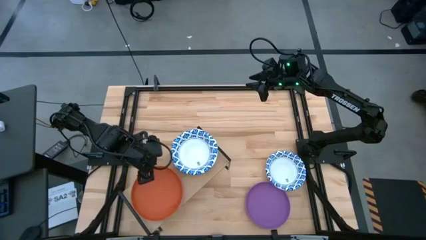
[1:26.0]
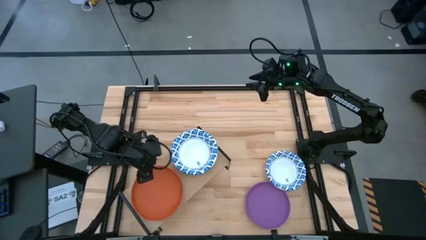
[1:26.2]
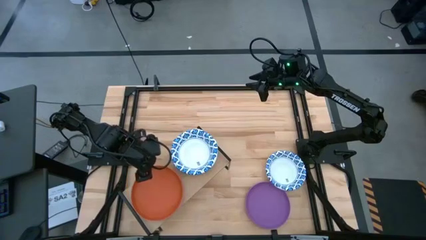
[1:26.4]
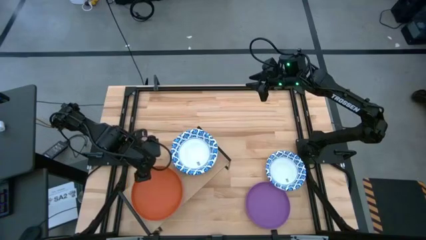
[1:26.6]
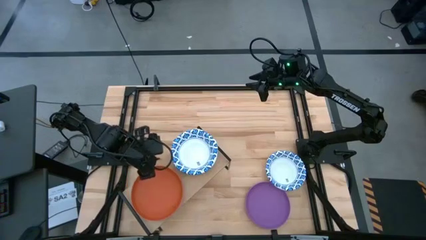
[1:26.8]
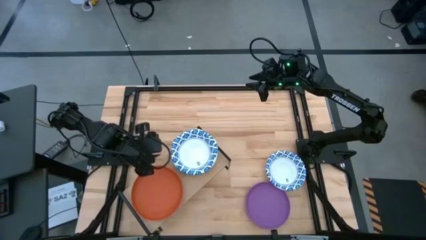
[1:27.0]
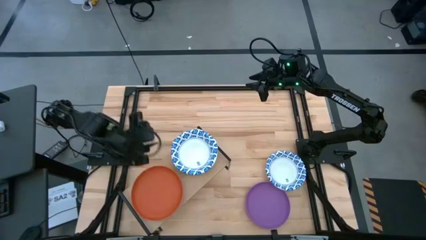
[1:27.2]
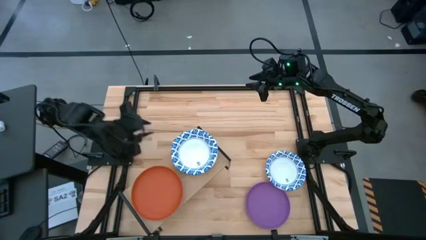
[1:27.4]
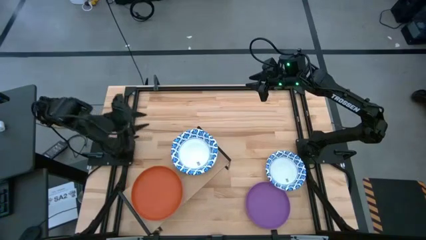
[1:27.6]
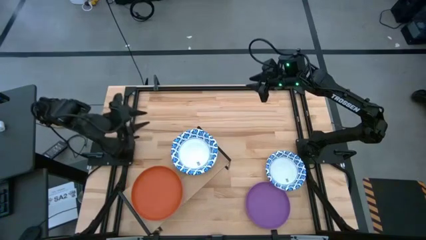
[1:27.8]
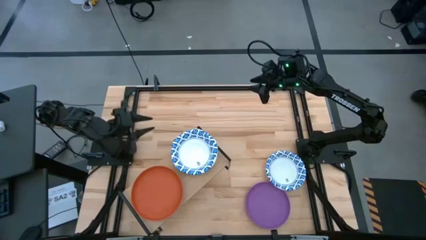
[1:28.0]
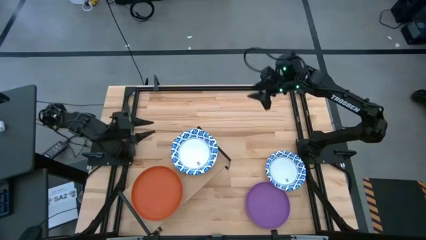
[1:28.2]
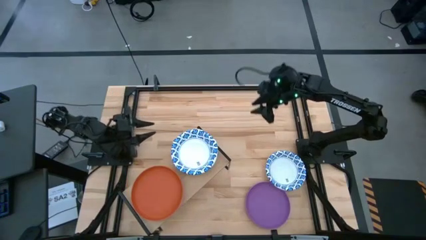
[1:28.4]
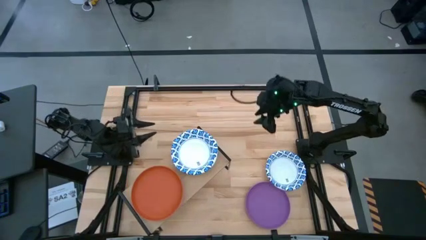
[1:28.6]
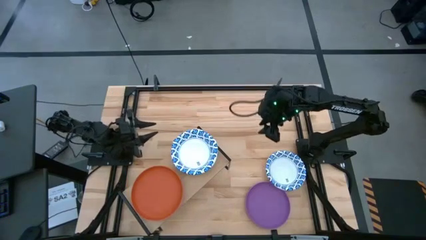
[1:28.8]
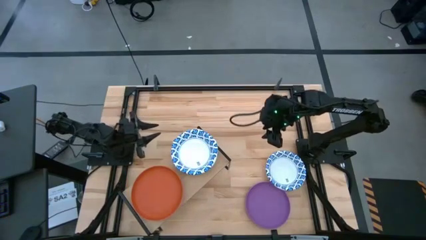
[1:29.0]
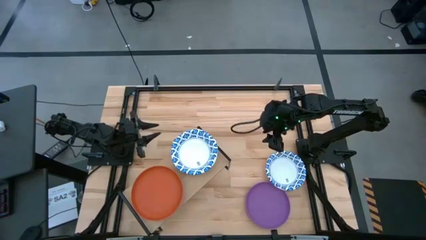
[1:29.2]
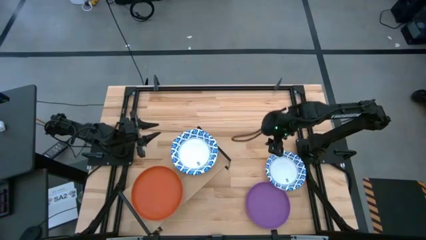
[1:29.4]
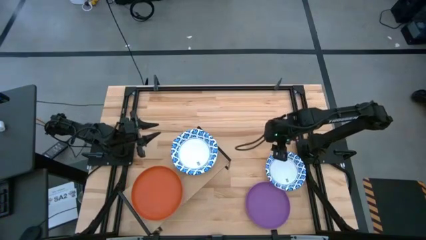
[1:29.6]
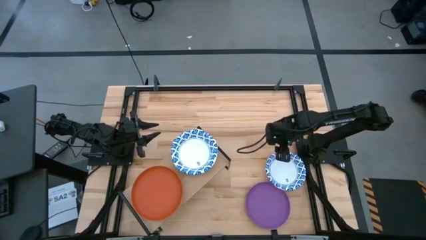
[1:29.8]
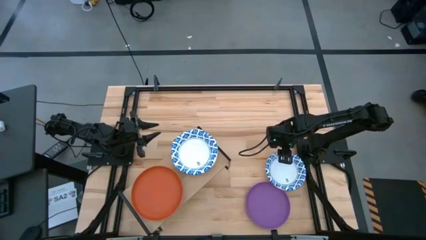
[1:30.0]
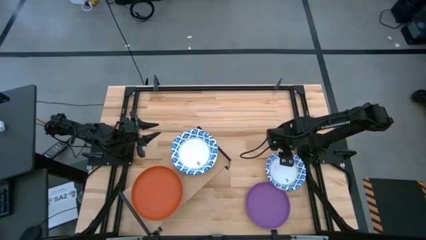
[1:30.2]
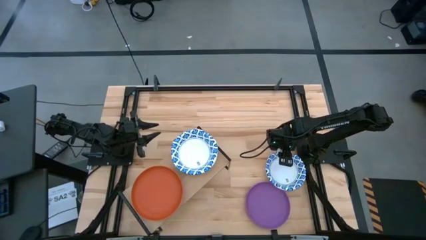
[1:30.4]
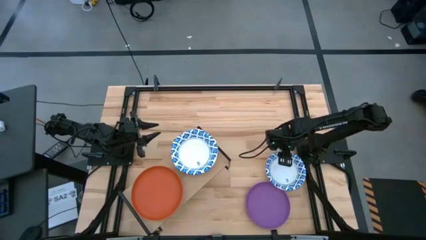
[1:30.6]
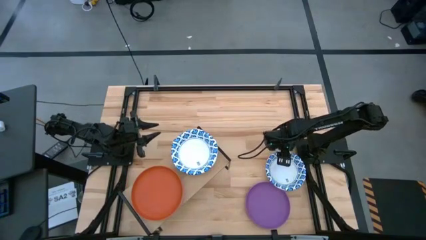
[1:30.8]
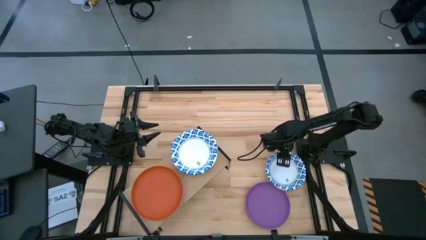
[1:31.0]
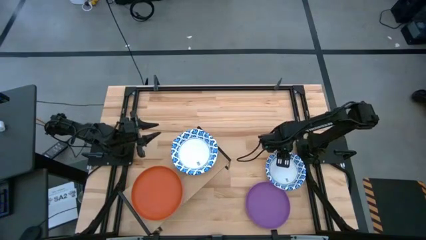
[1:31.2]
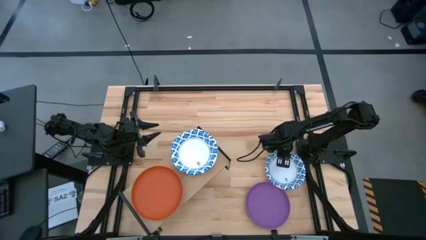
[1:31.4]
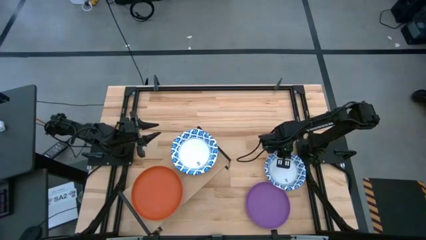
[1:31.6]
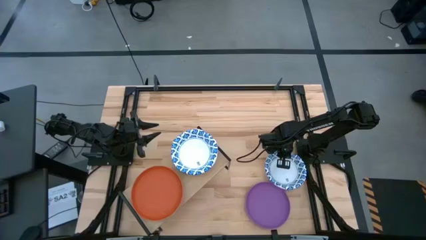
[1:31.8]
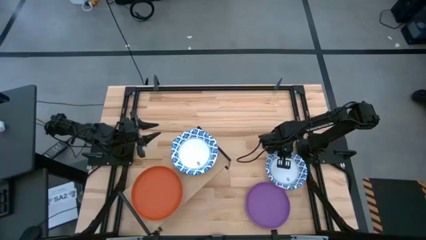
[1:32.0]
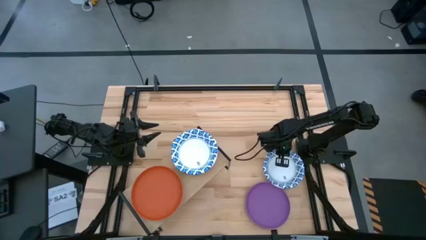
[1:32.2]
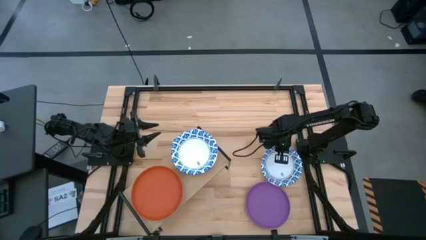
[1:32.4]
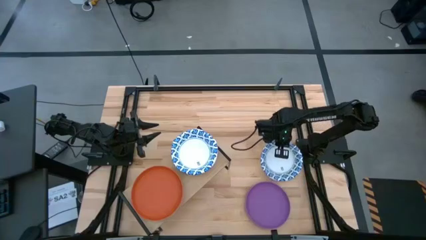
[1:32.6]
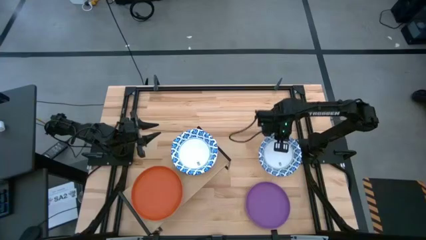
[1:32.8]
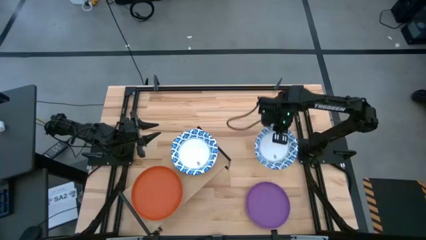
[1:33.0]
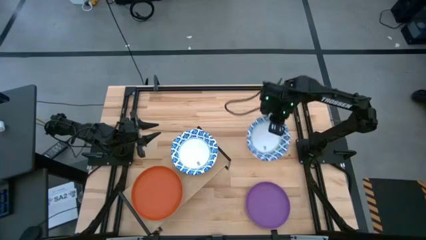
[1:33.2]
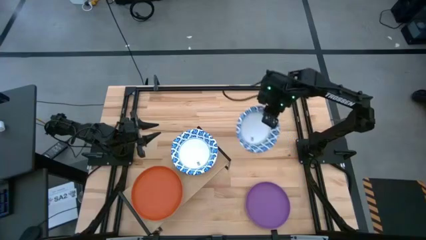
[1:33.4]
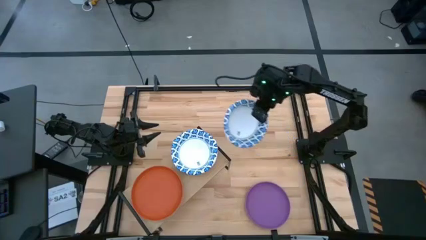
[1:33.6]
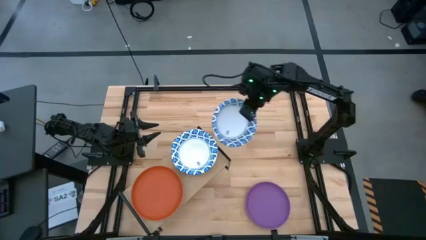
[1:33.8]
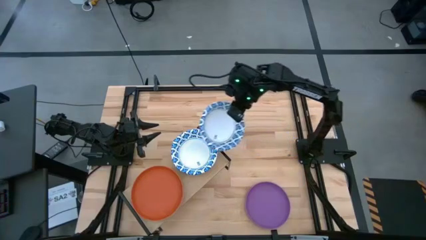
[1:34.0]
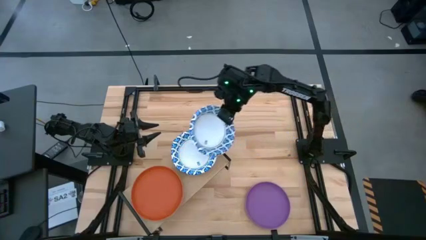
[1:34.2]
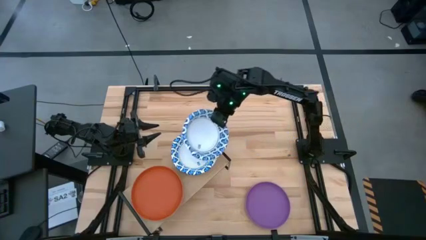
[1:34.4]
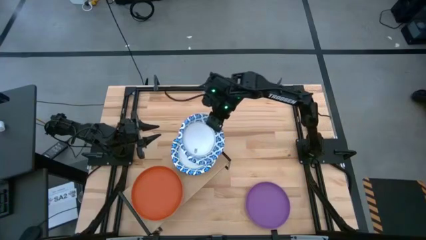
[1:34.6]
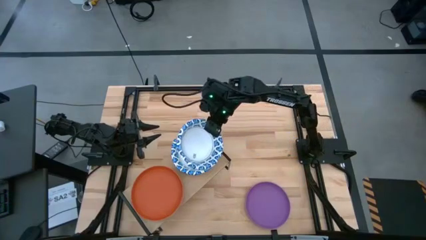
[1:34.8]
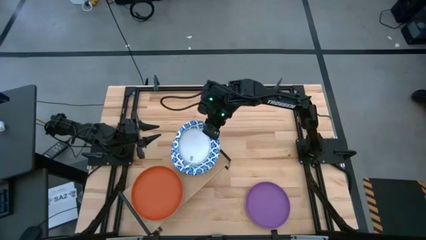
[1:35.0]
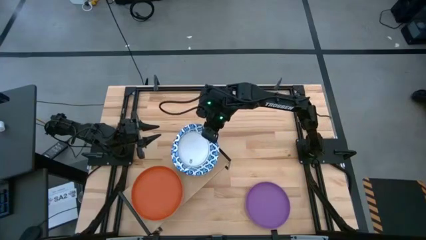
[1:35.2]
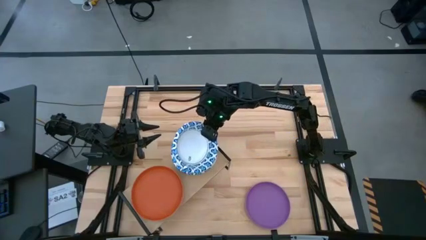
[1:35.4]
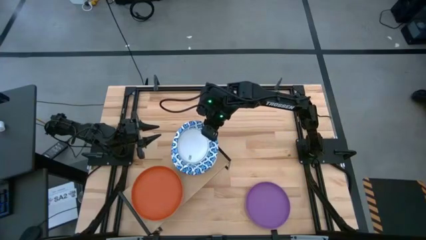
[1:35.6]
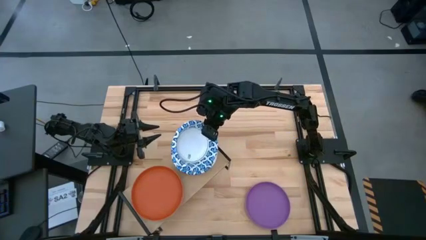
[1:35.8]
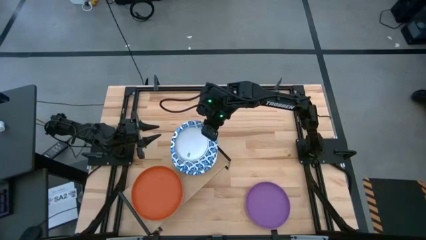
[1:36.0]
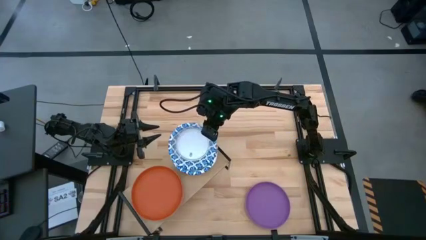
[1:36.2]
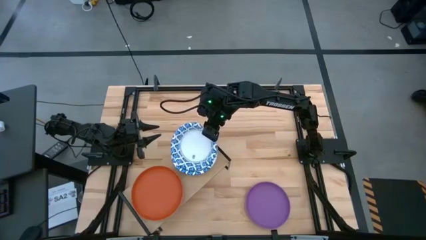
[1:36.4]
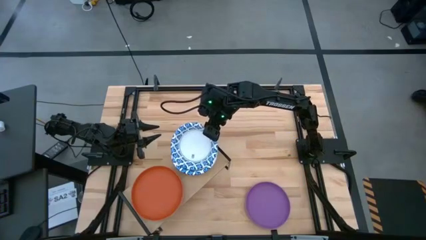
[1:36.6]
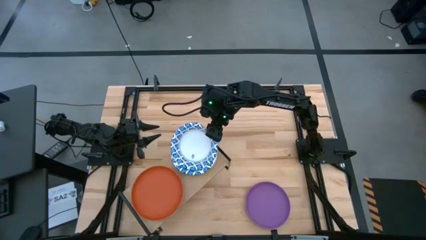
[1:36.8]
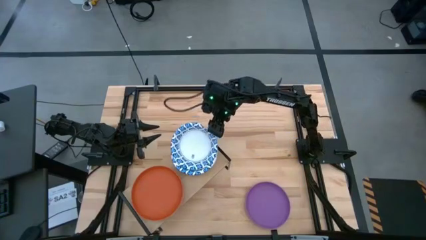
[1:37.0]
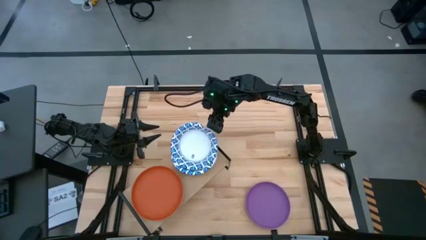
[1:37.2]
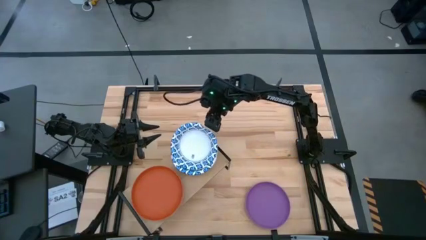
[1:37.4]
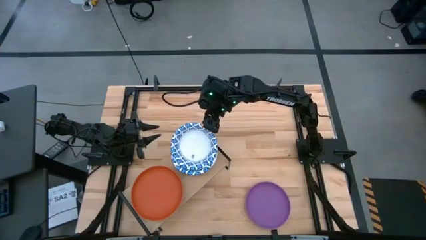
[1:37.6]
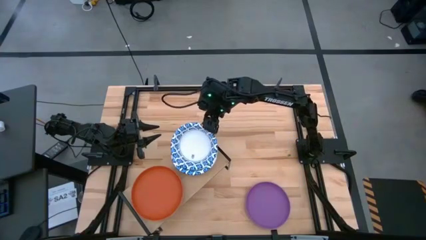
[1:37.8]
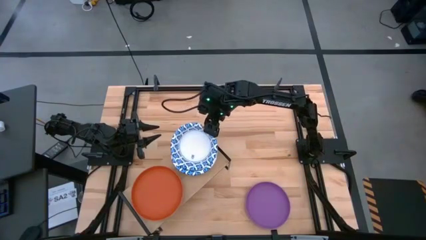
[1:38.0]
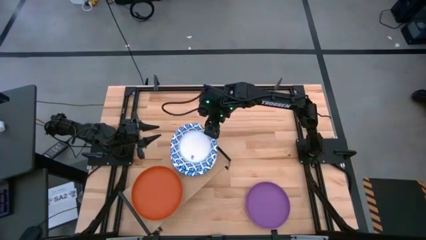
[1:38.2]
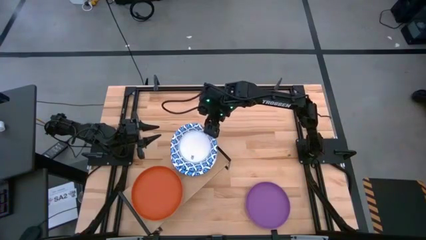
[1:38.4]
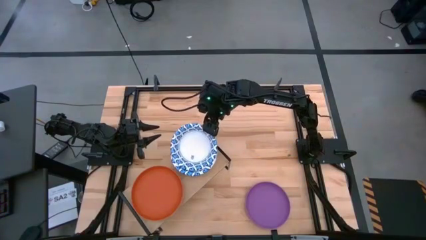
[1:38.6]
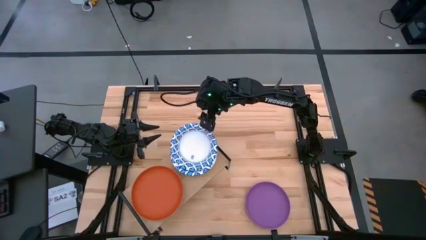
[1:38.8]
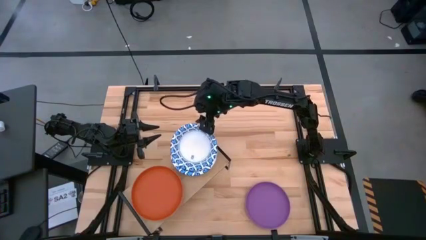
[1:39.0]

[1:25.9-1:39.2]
Task: Place and stack plates onto a shelf
Stack the white bowl on top of the other white bowl on the shelf

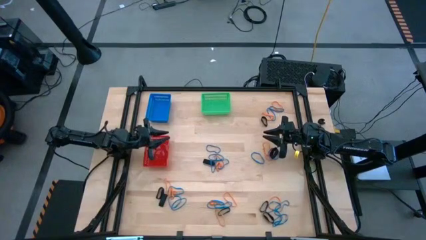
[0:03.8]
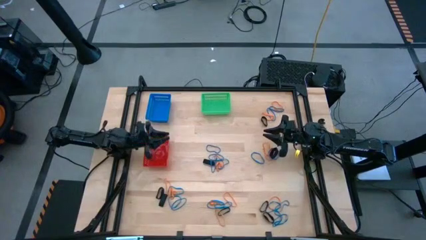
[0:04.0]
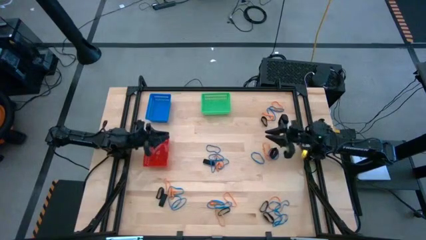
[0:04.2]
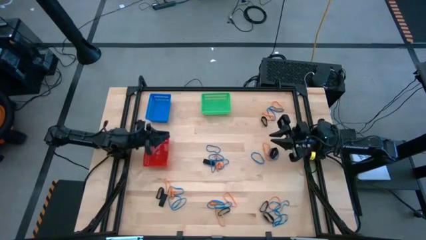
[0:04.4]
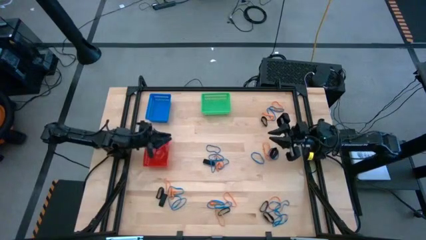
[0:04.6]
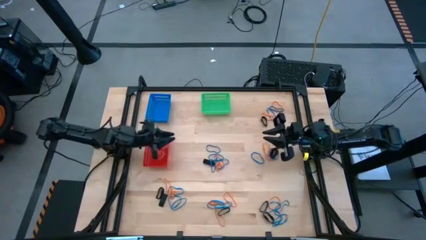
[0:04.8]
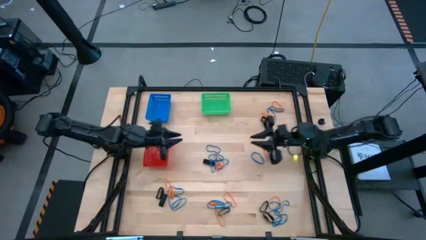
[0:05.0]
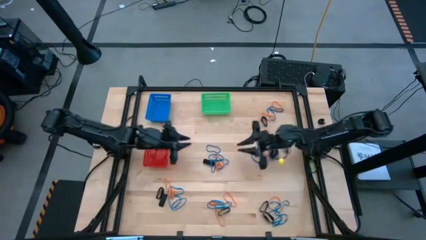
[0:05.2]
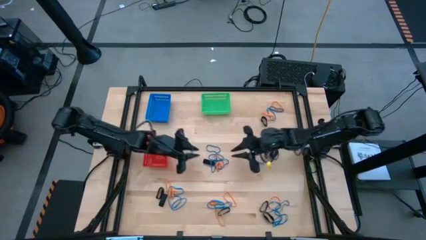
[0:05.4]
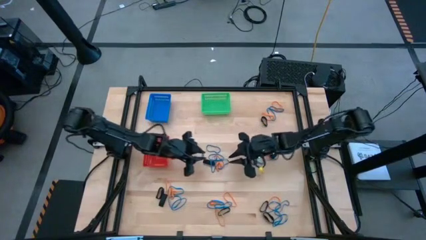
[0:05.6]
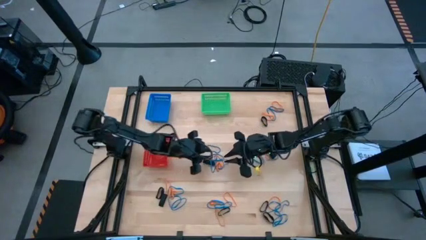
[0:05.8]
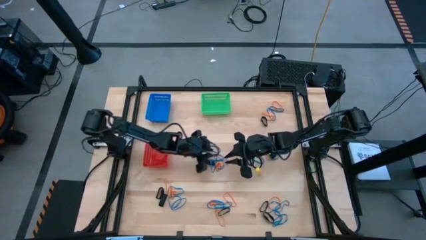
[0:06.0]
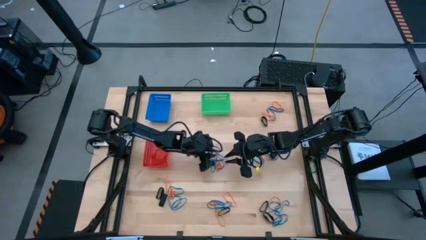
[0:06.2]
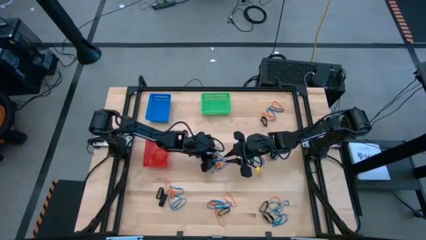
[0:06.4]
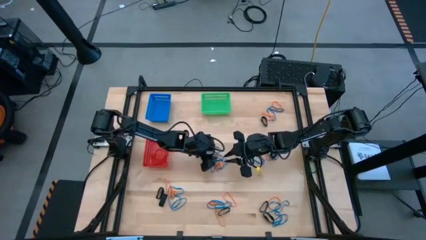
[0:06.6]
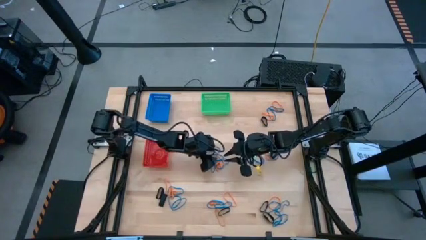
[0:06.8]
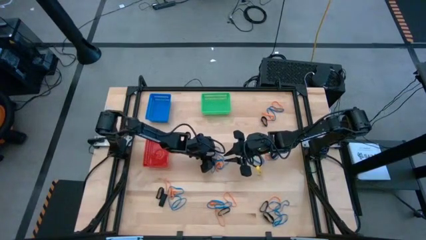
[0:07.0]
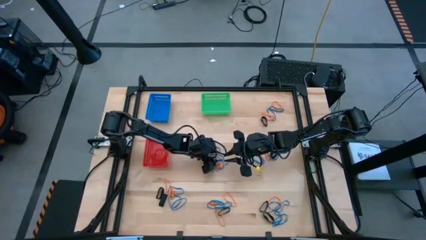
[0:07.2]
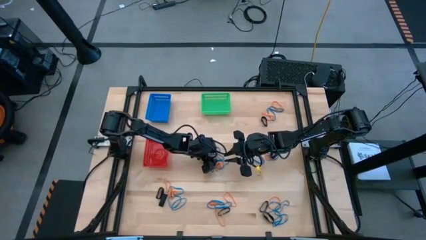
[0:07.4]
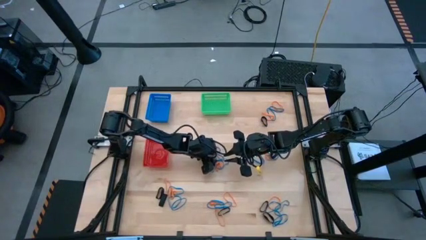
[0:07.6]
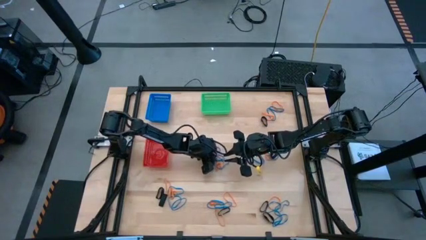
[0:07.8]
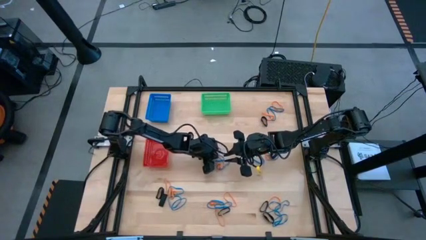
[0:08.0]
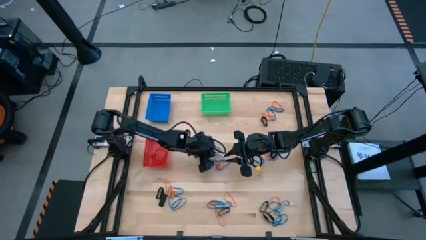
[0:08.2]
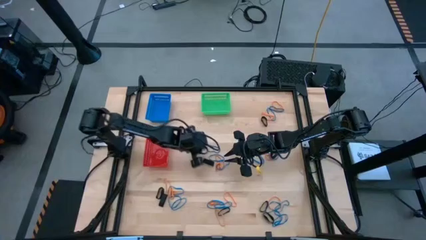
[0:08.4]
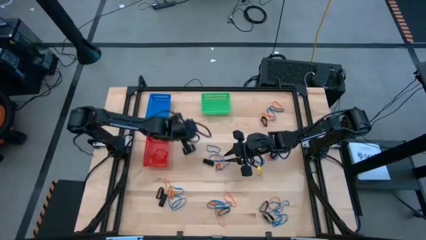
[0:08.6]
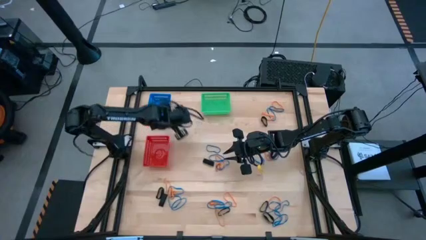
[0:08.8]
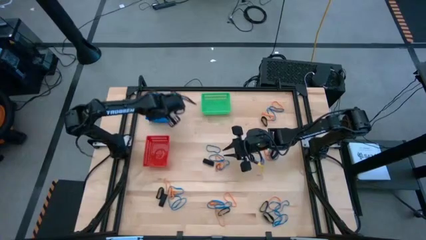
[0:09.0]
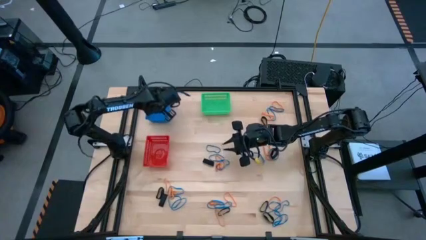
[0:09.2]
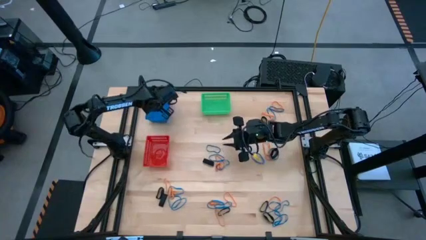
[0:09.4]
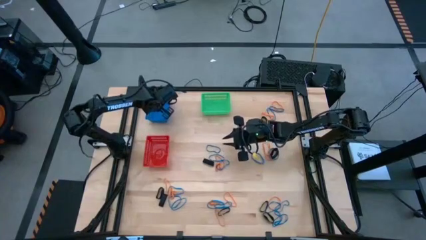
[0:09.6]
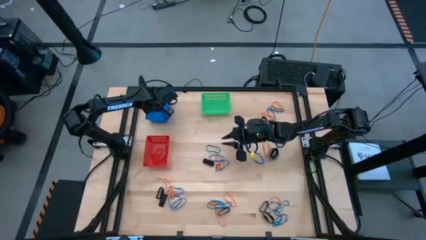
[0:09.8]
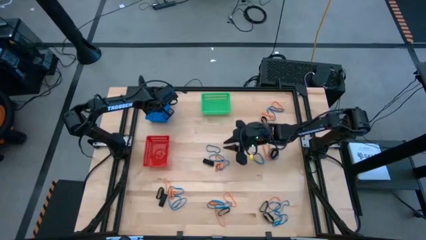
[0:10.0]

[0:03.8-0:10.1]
Task: Sort rubber bands into baskets
Put the blue rubber band into the blue bin
